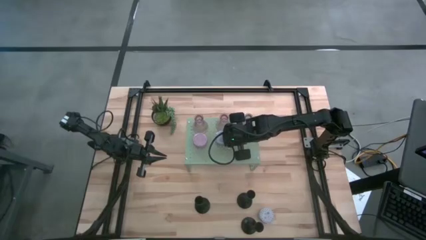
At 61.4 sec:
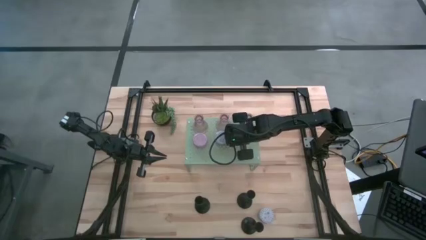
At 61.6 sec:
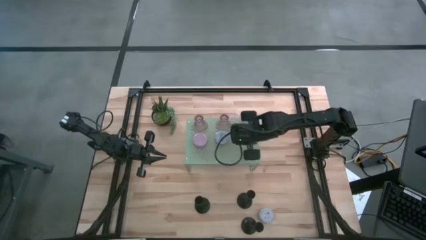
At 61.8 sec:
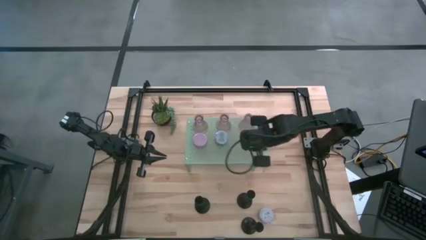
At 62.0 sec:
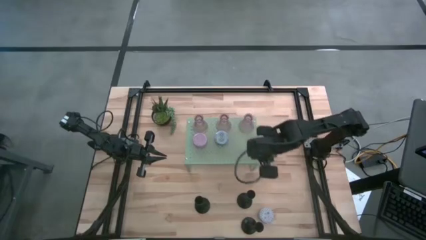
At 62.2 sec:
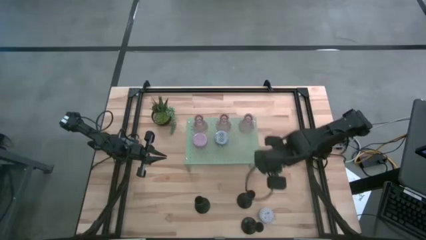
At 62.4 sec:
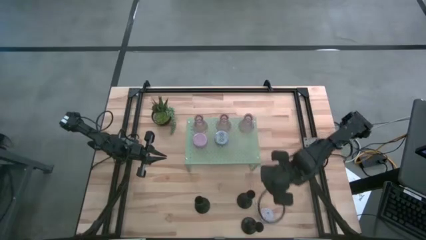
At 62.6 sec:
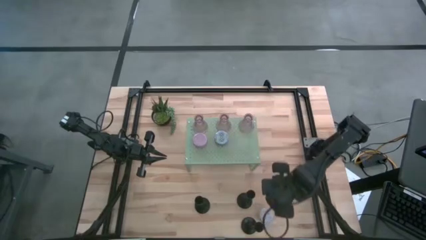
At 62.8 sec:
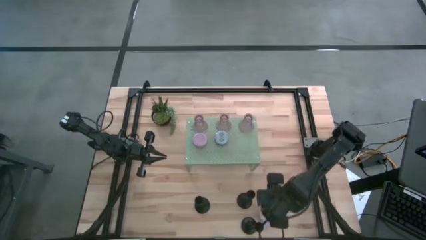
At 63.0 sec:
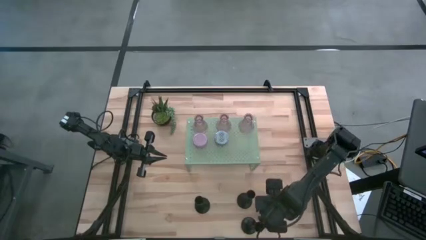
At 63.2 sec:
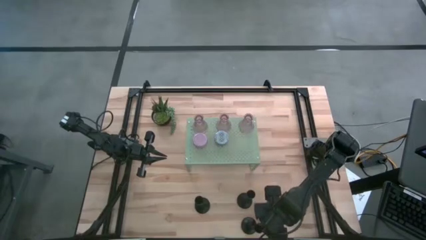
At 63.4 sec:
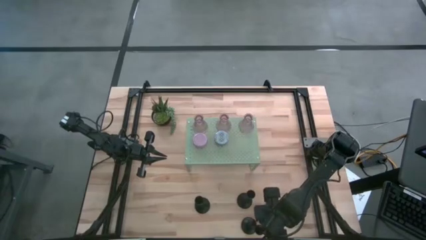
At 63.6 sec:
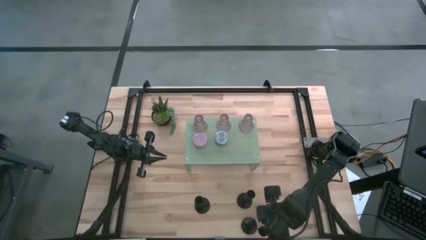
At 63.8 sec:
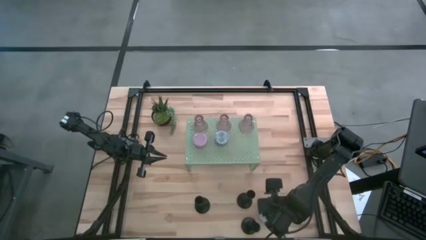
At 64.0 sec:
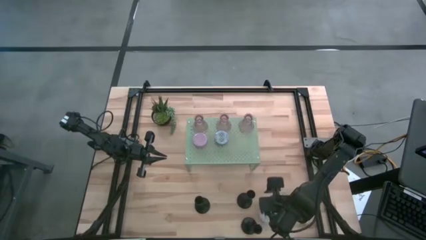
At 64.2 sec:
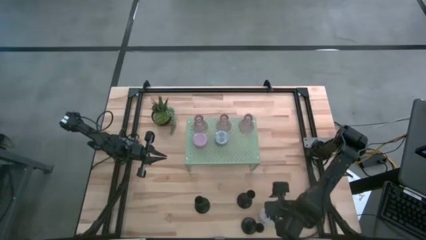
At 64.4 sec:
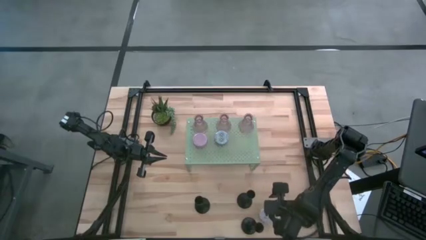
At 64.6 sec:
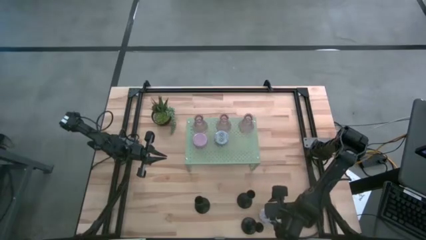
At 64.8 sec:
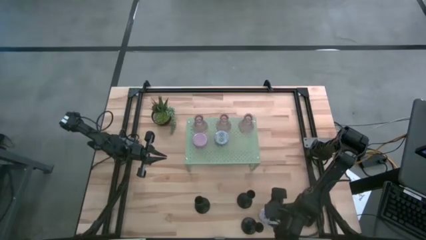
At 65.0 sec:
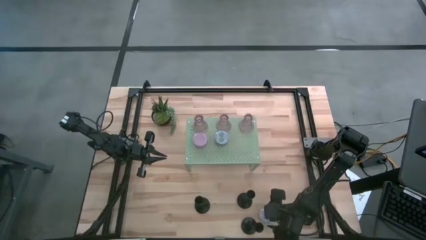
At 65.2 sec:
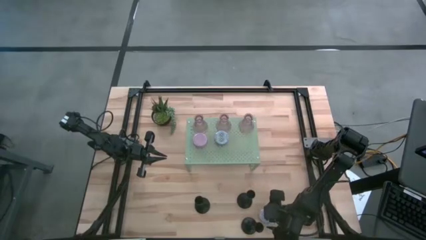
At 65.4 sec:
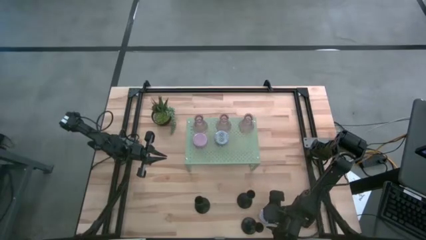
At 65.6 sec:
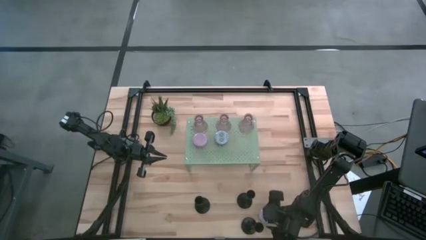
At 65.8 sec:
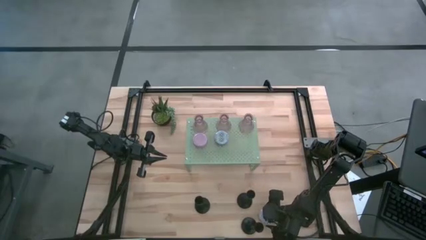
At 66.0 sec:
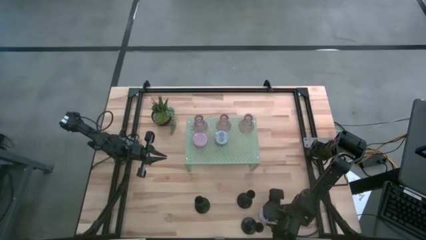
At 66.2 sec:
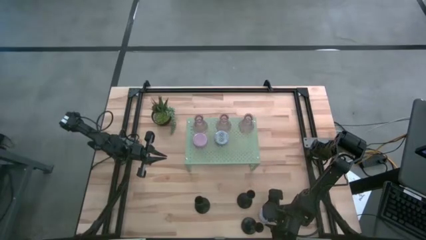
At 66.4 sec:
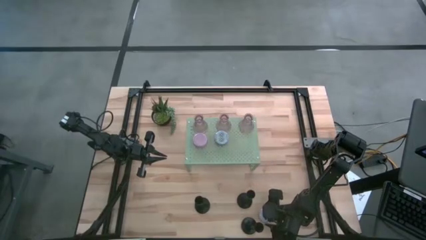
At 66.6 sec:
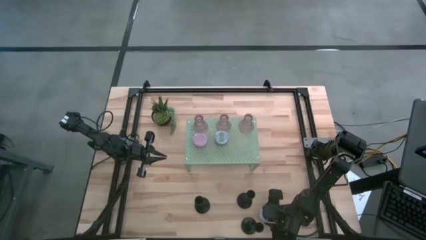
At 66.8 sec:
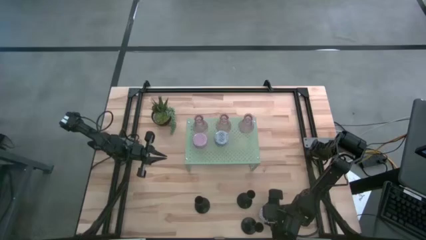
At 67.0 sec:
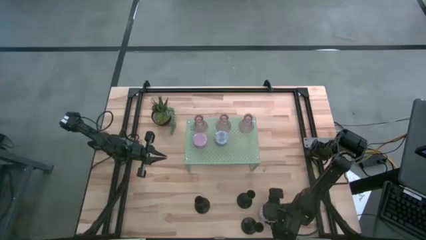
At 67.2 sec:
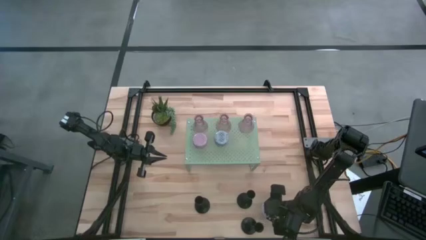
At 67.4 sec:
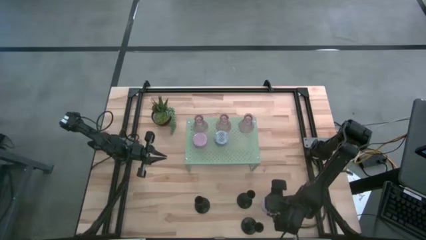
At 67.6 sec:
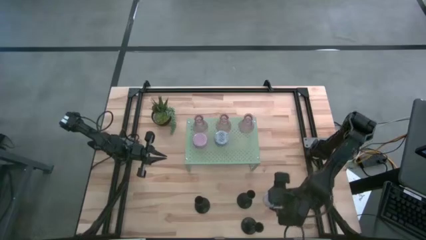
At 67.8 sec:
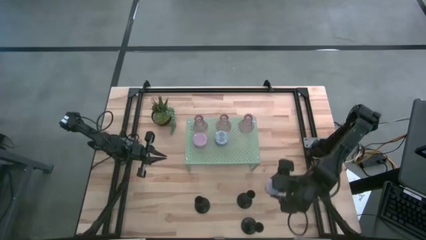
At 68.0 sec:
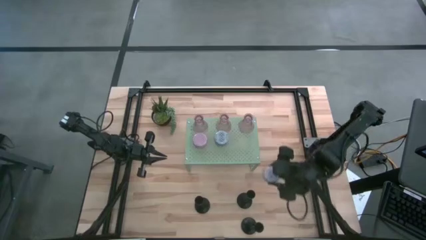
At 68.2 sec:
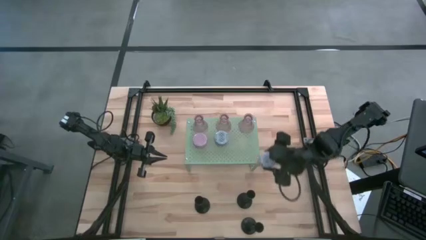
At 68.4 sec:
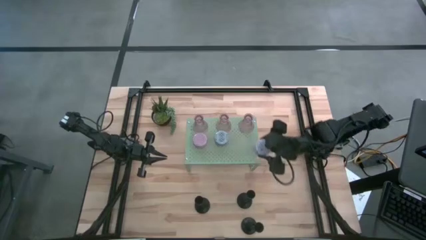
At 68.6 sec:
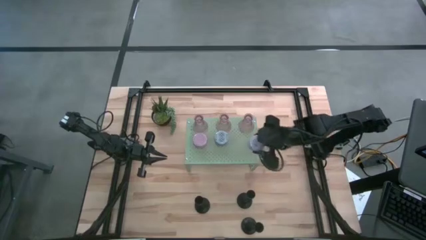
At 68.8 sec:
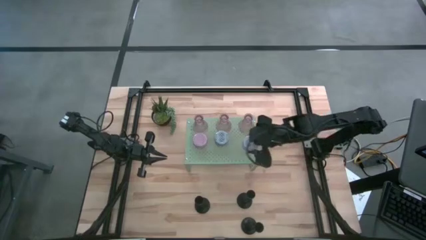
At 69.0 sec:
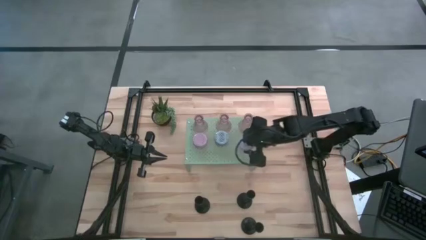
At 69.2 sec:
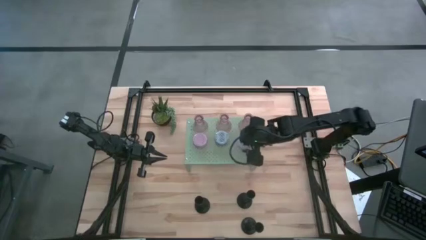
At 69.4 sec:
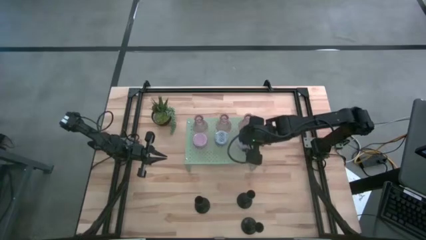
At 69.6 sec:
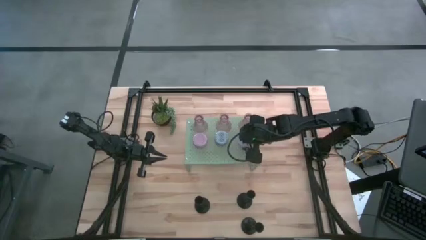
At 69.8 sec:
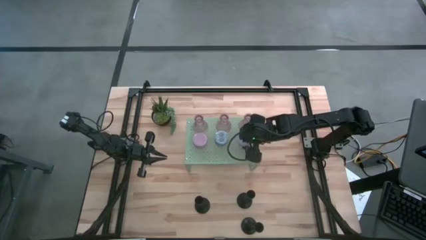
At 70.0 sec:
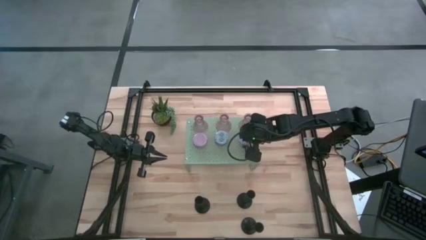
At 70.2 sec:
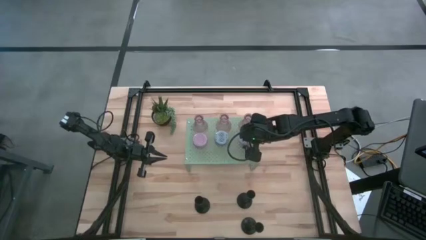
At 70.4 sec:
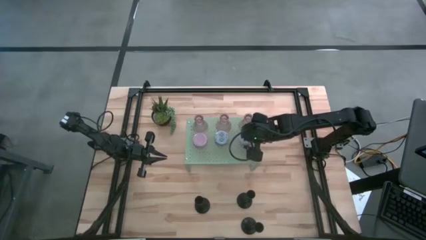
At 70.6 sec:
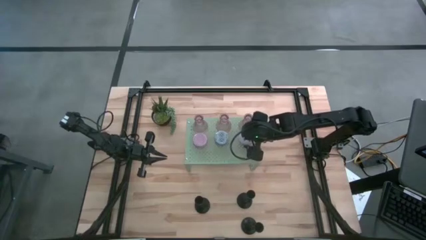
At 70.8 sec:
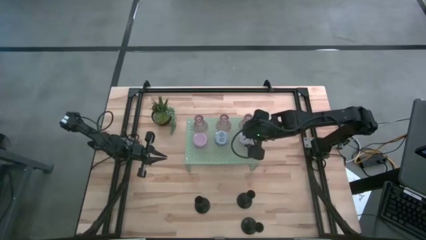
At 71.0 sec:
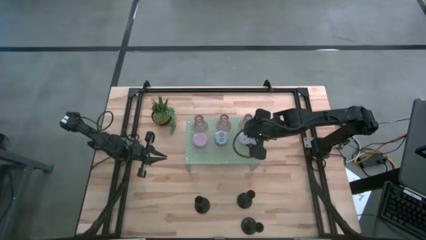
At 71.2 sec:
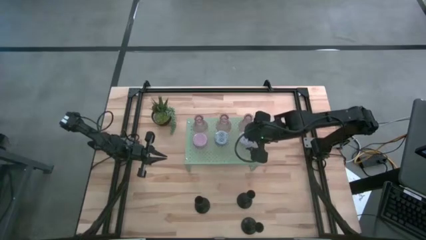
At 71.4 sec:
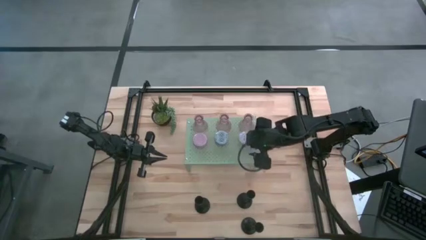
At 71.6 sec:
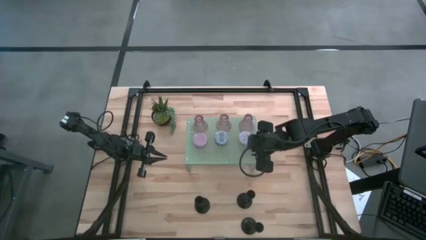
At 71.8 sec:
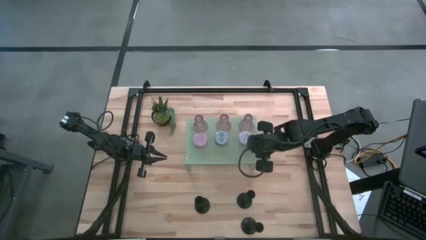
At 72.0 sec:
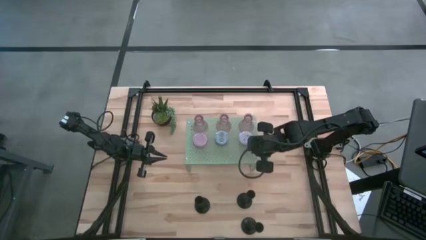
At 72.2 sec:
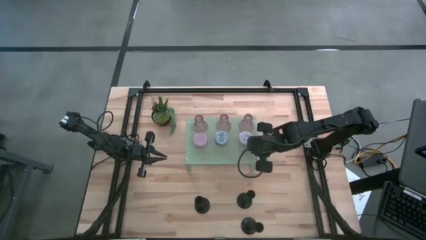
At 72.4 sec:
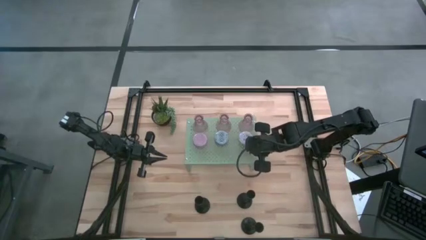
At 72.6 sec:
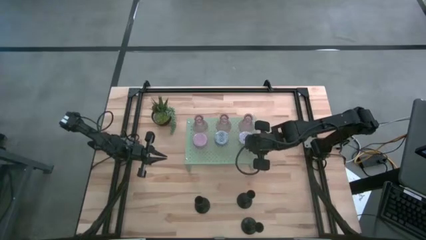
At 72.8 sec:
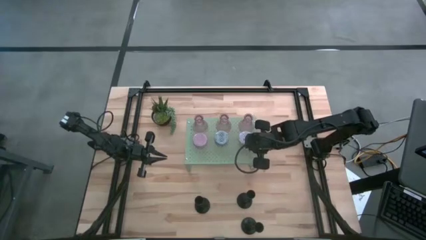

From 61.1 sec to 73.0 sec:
Task: Pick & Place candle stick holders
Put the red scented candle on the shelf
